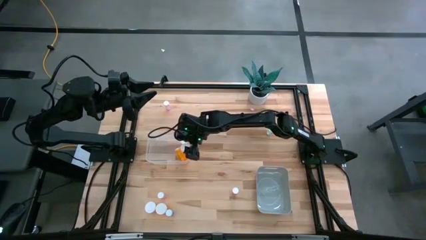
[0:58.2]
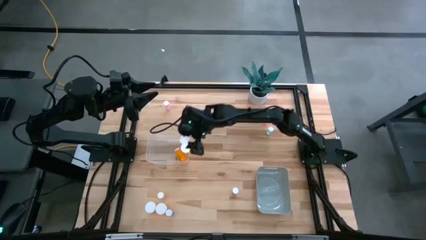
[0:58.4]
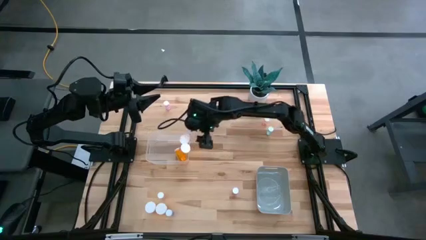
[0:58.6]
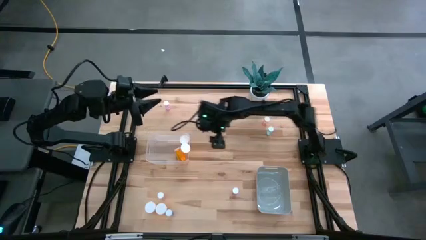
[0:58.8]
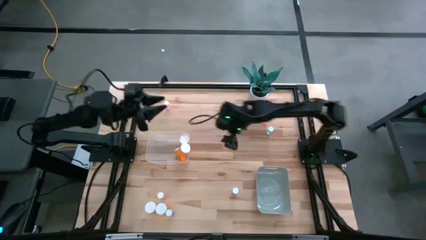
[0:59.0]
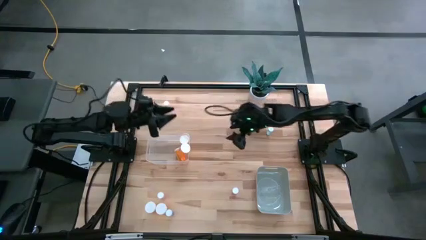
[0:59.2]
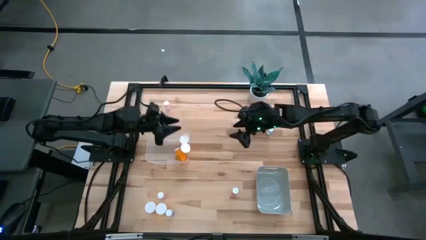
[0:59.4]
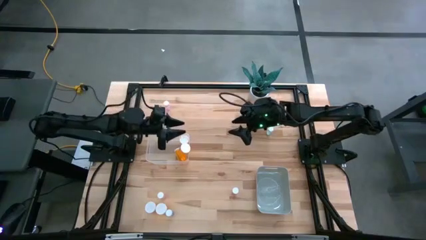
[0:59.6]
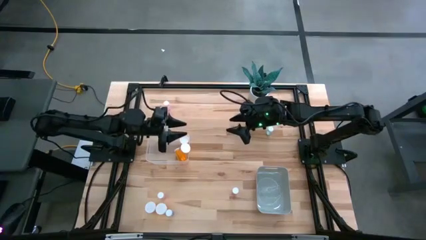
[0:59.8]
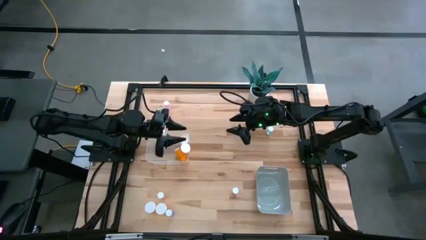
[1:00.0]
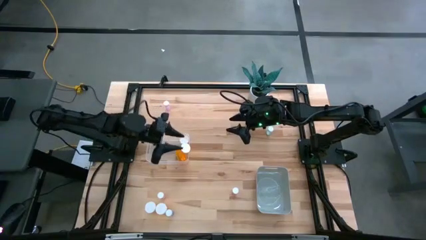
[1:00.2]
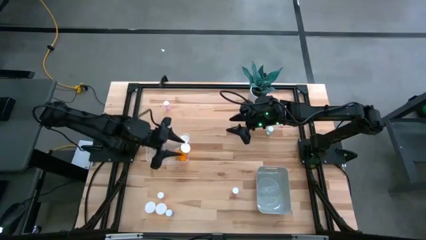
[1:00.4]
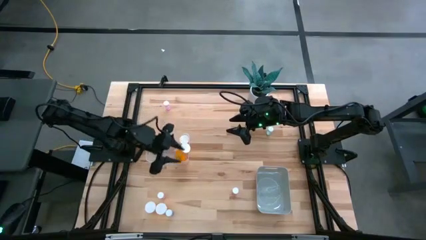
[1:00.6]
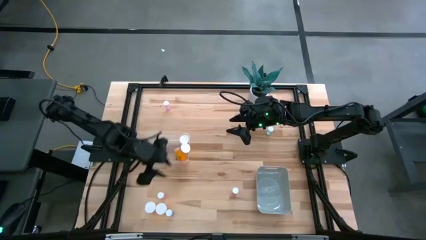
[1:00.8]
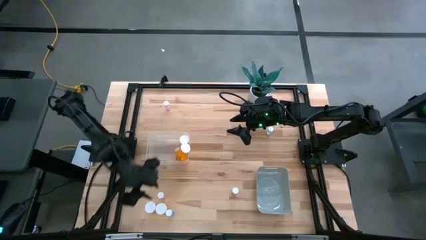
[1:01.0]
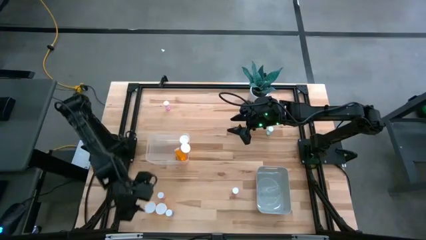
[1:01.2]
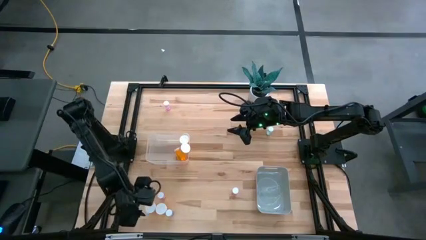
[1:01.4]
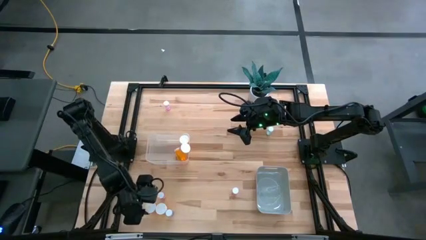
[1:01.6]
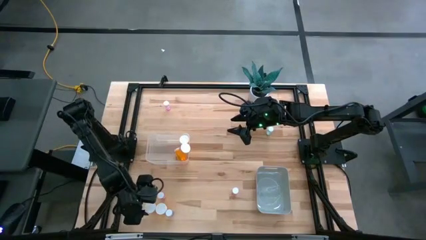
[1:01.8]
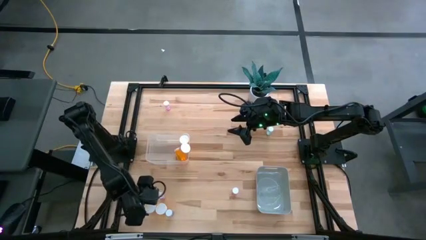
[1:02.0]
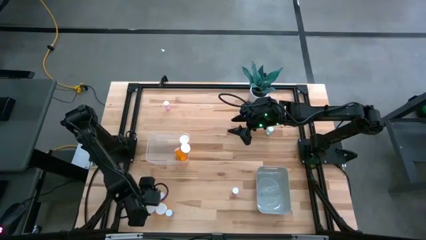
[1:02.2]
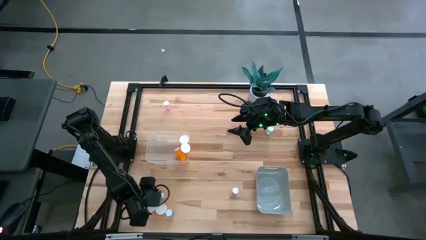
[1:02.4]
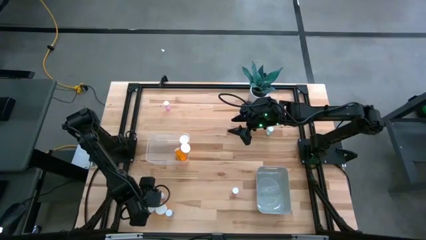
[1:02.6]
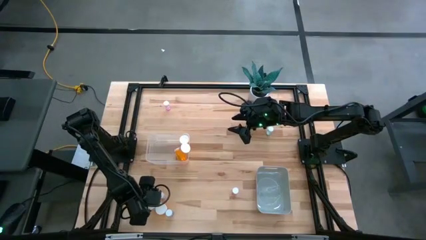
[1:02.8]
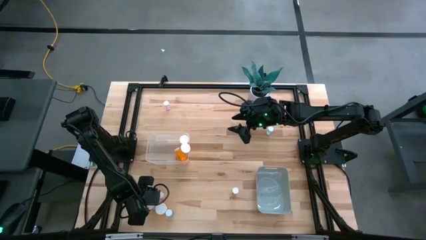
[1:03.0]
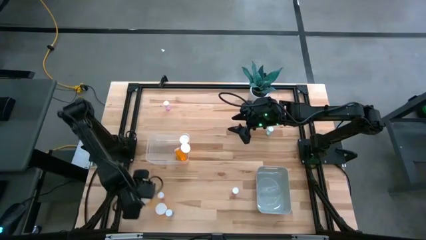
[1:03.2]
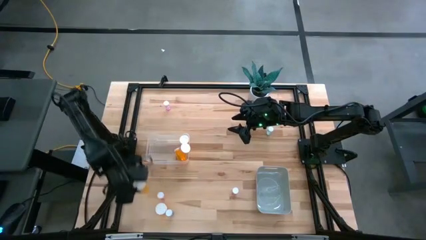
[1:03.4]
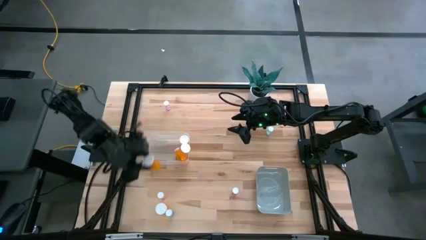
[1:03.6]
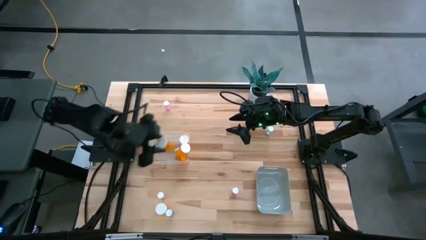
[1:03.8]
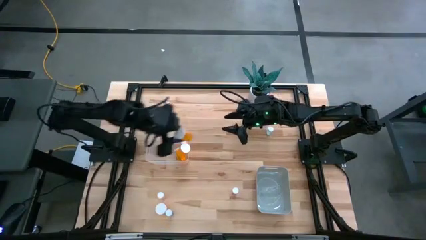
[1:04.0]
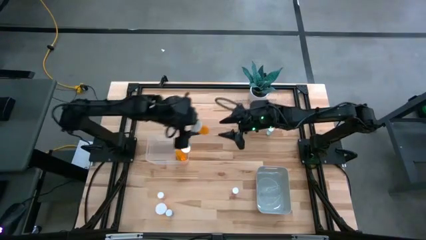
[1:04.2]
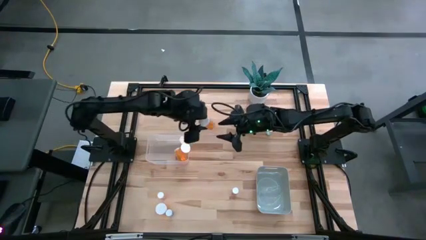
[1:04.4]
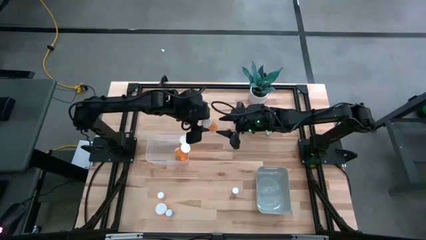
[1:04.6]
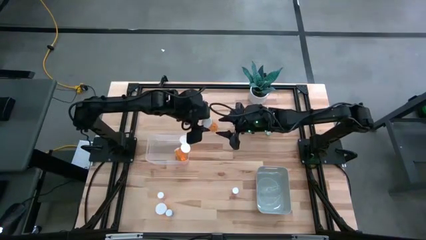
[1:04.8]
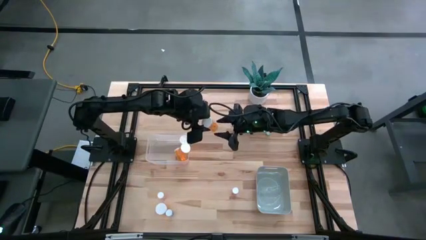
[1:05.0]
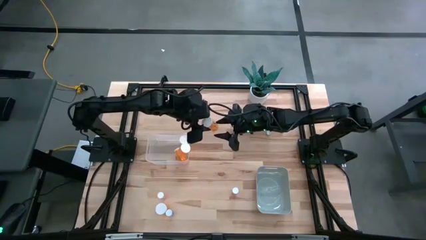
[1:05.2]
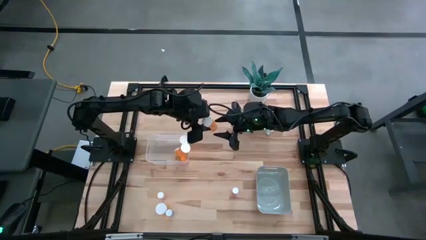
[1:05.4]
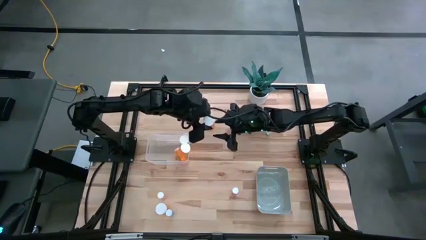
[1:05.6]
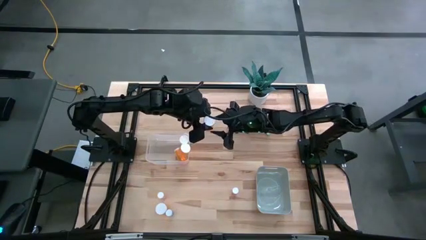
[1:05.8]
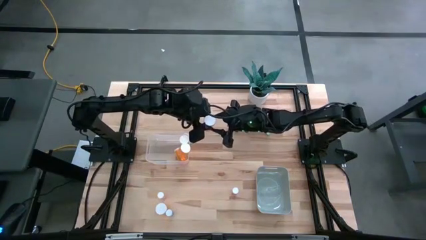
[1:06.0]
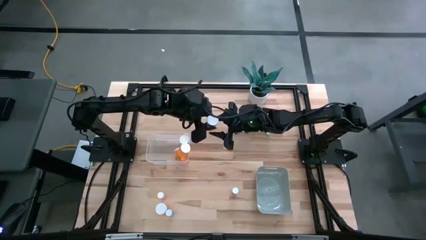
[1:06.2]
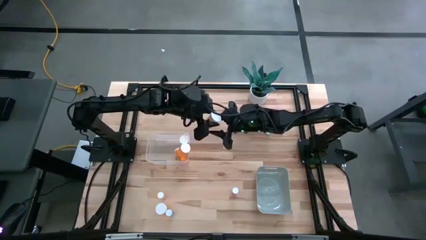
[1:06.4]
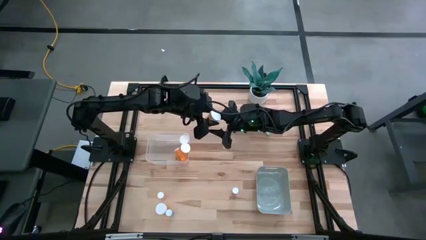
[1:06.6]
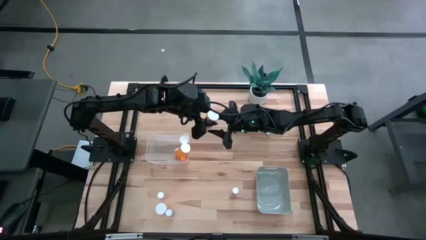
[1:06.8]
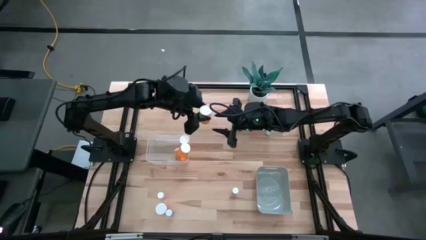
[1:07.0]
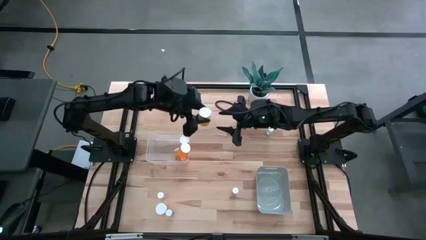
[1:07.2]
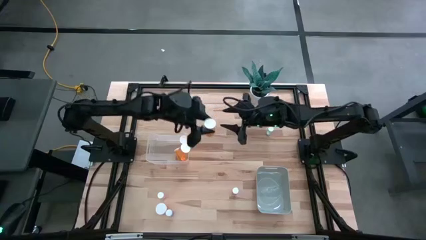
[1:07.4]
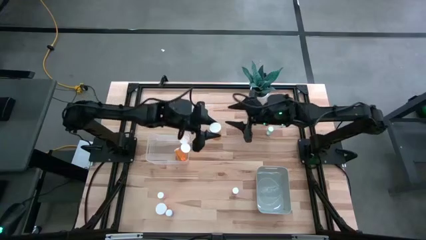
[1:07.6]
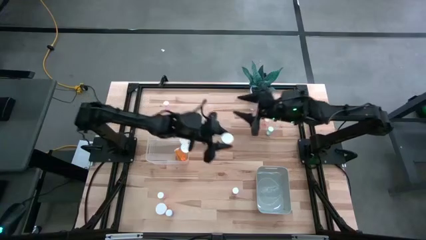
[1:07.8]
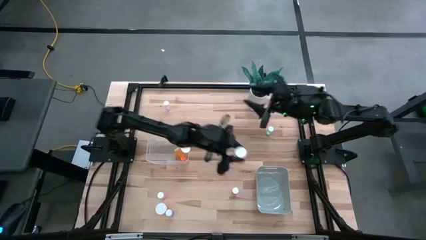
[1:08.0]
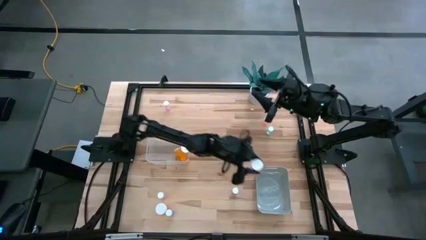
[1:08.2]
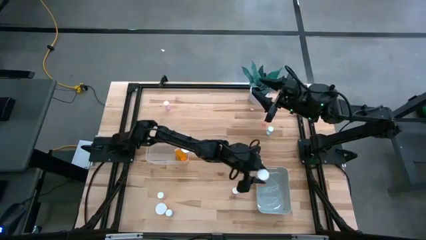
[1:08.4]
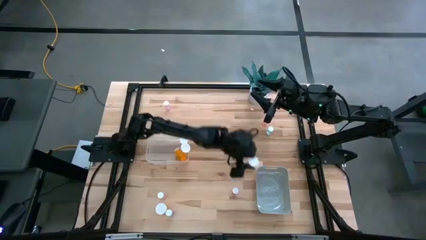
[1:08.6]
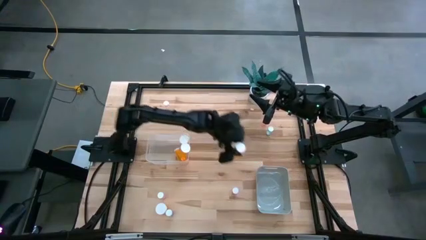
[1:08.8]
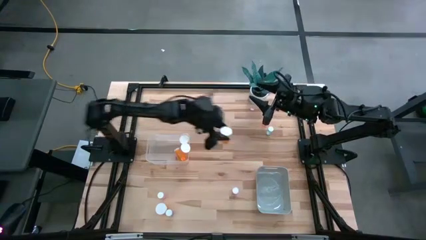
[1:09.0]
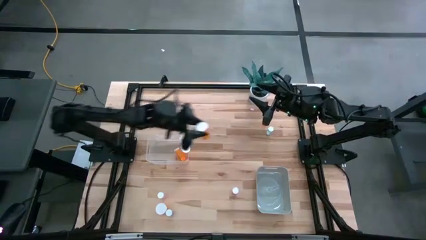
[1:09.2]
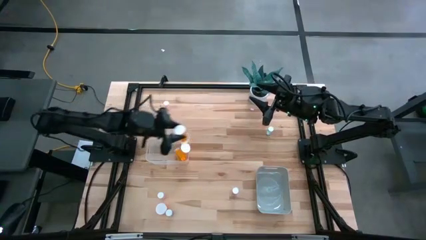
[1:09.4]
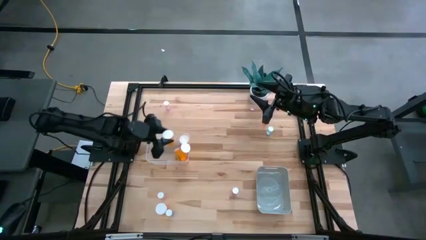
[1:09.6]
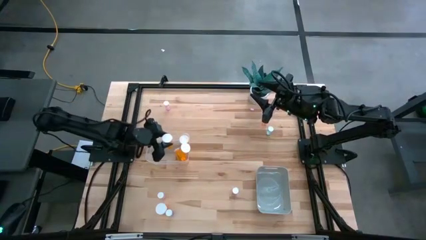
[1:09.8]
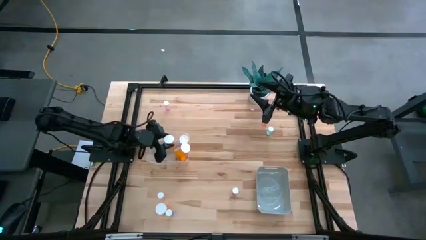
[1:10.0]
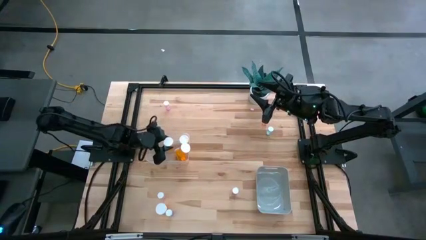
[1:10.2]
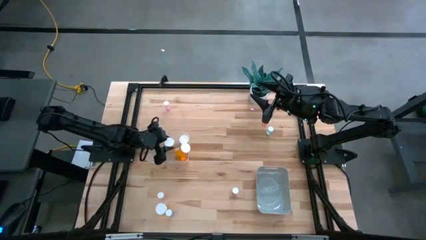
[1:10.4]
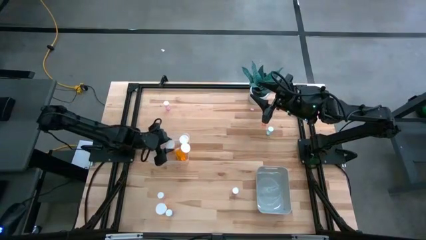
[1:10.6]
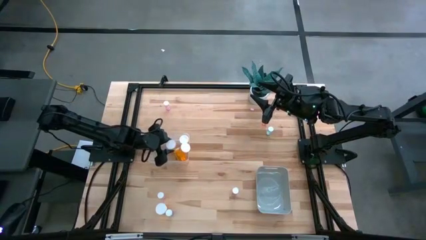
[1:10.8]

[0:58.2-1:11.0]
Task: Pick and place medicine bottles into bin by pill shape (circle, oval)
Put the large orange pill bottle into the transparent bin

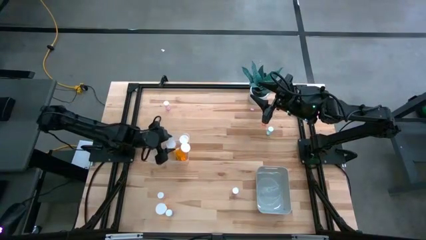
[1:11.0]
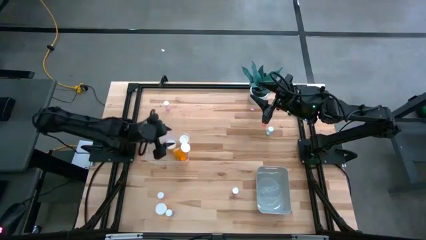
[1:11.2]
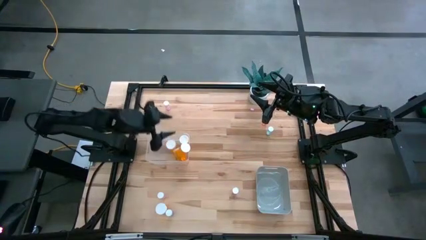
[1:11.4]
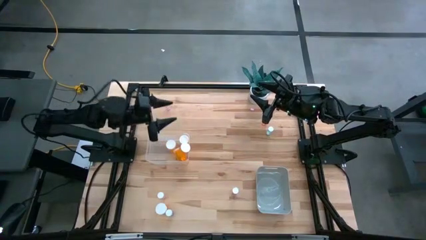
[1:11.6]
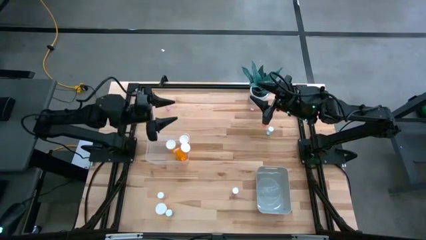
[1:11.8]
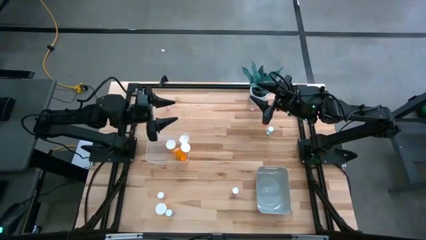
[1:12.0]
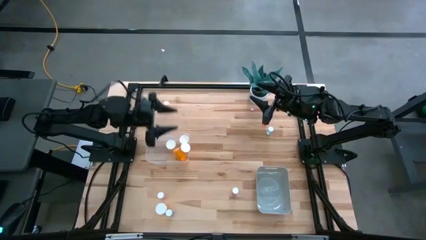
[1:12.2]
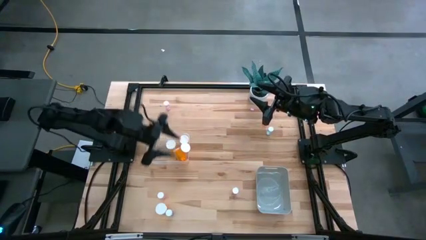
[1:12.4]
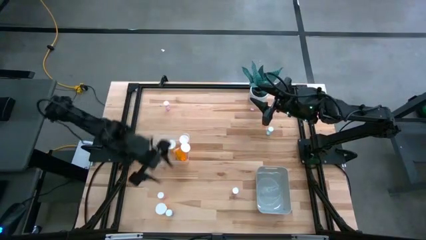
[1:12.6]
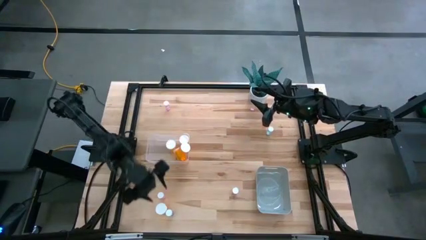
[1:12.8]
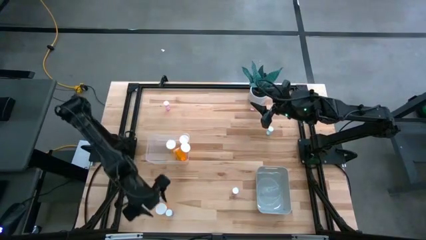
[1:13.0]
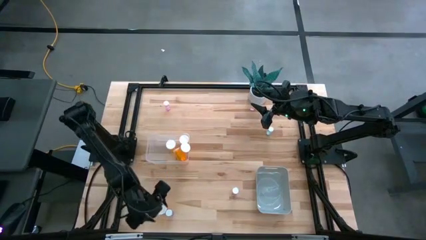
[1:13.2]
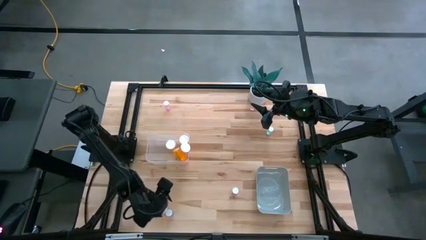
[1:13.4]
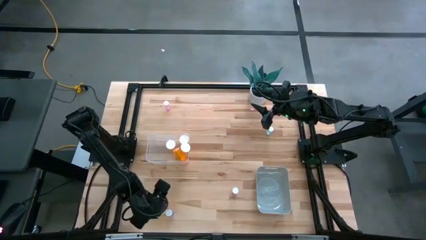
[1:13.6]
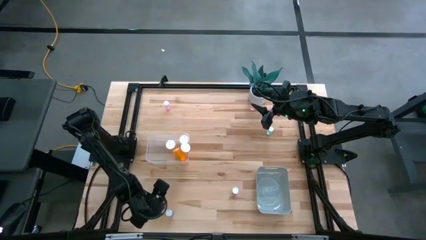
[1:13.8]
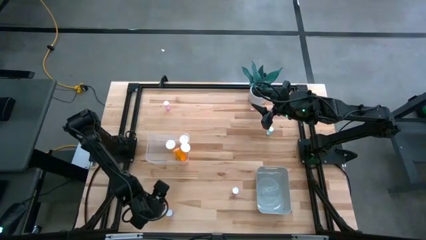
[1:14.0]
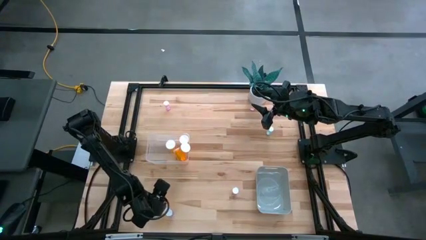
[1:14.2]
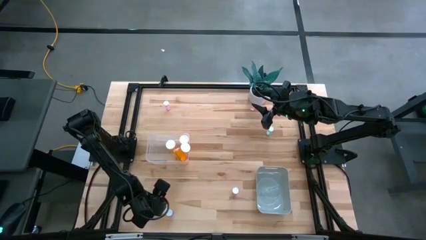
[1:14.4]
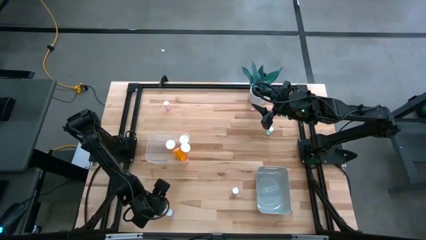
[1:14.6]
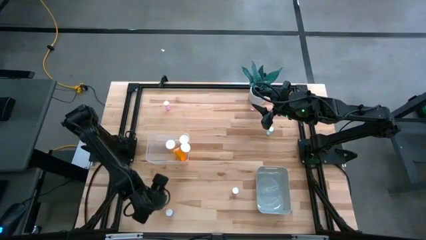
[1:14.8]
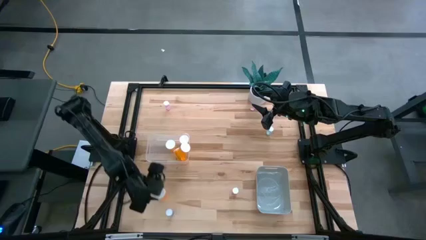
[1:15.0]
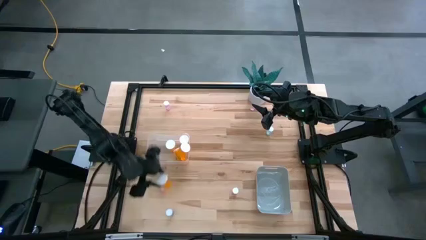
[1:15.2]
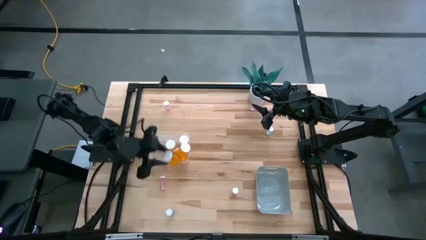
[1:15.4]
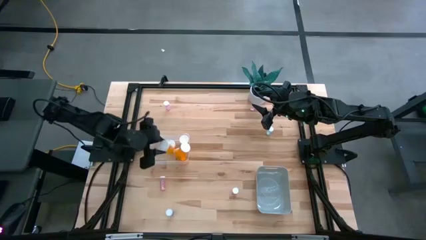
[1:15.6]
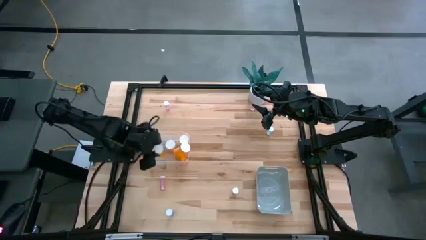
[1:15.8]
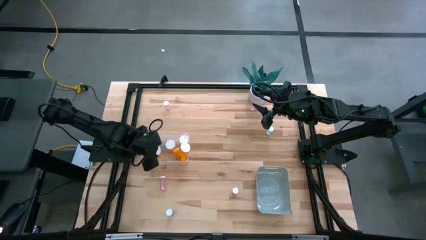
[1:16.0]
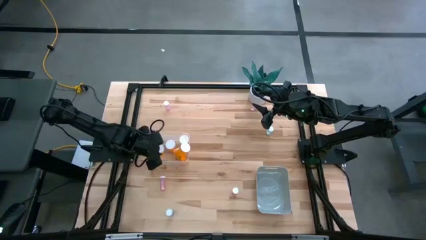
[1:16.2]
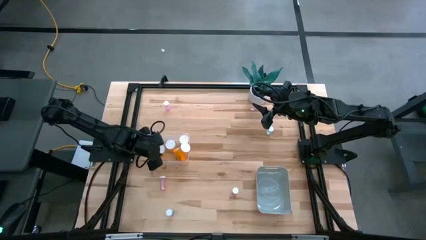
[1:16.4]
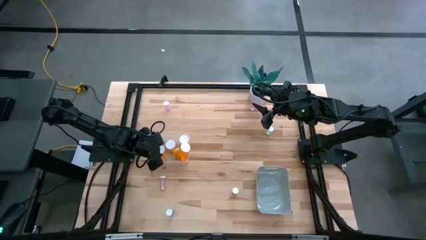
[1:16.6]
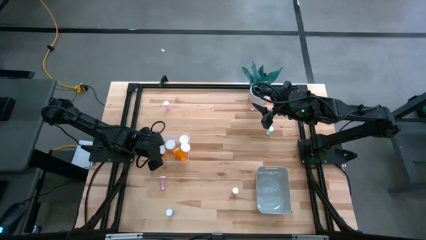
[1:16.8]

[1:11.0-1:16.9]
Put the large orange pill bottle into the transparent bin
